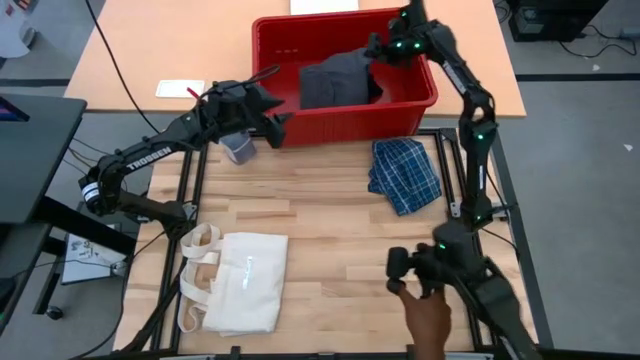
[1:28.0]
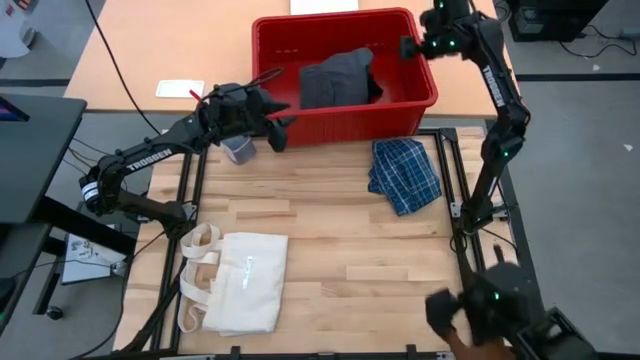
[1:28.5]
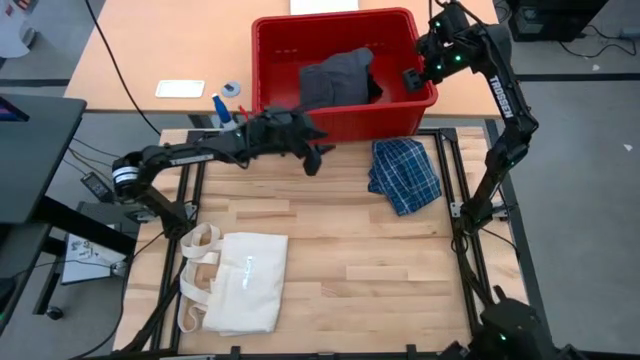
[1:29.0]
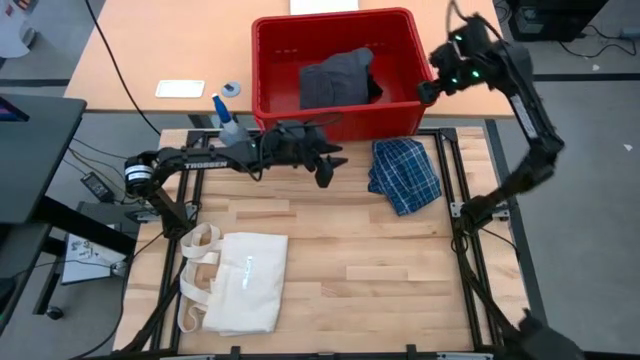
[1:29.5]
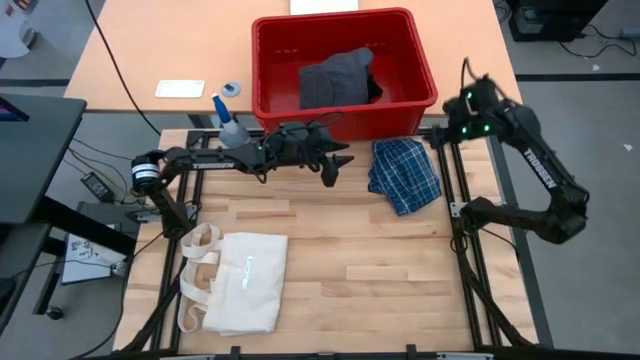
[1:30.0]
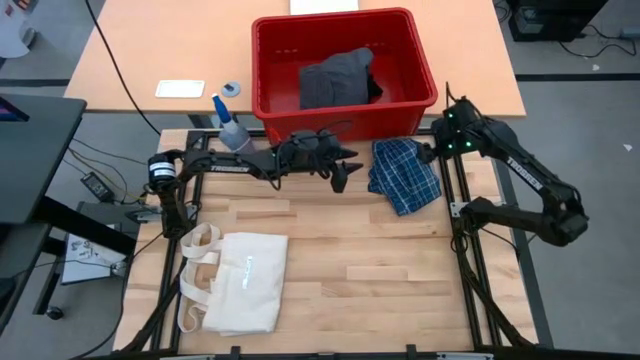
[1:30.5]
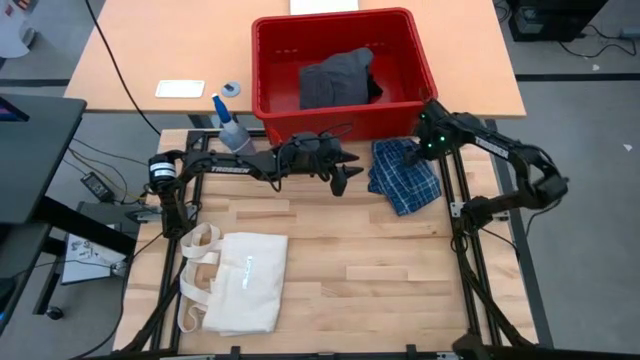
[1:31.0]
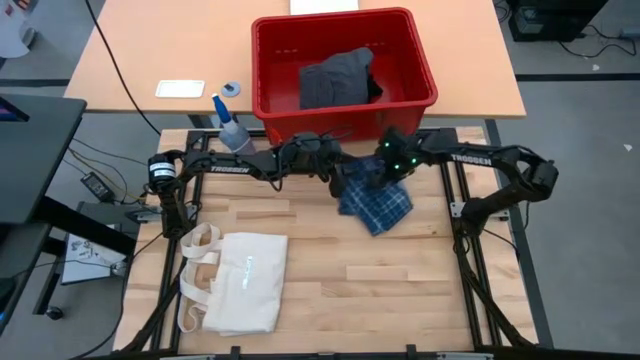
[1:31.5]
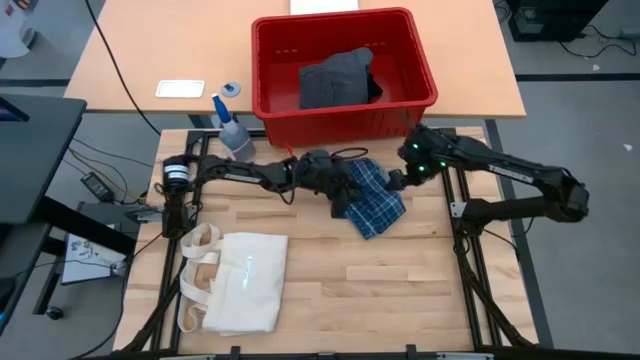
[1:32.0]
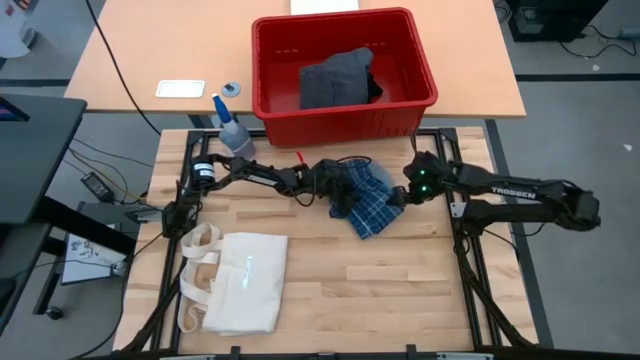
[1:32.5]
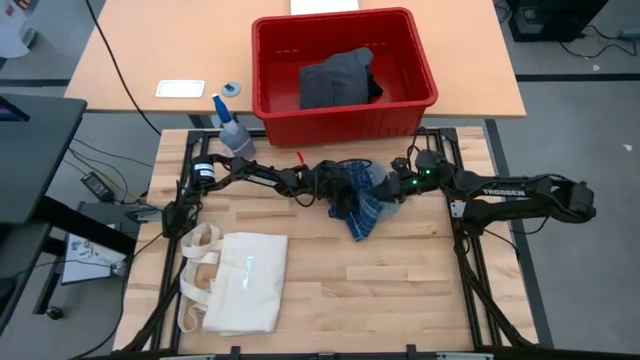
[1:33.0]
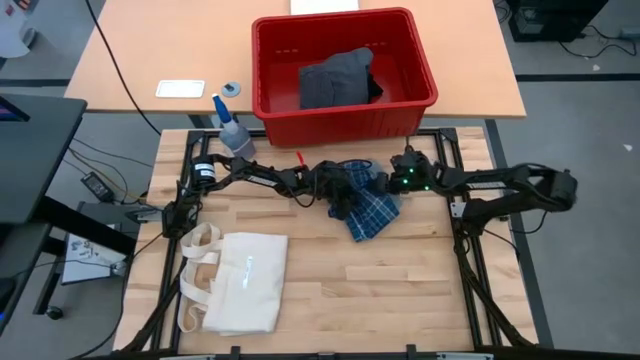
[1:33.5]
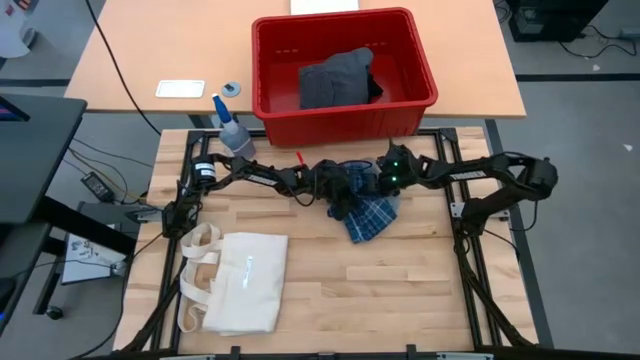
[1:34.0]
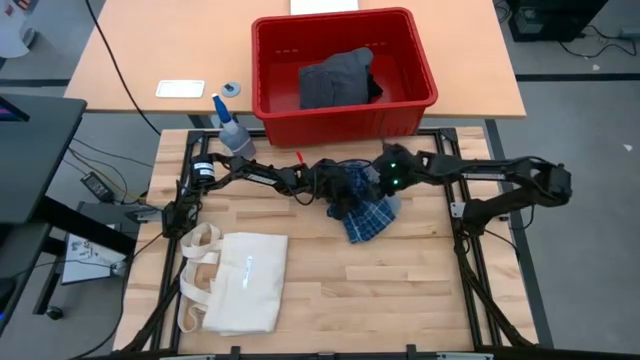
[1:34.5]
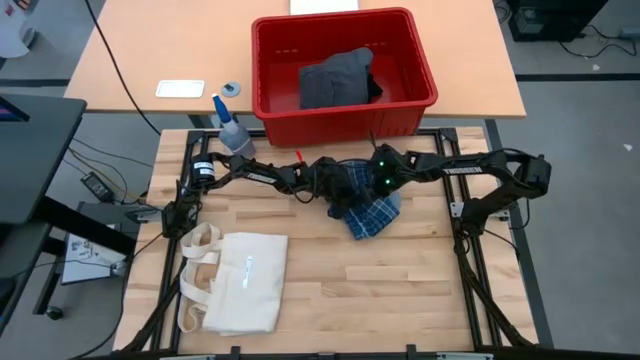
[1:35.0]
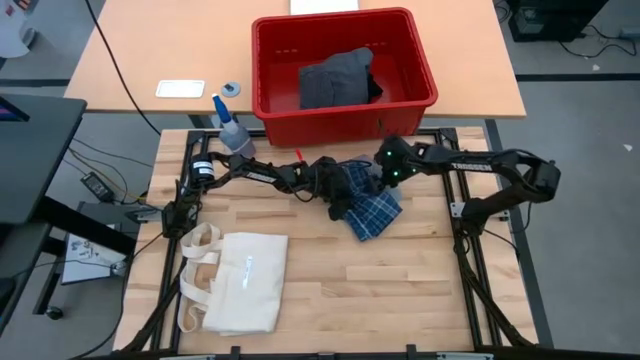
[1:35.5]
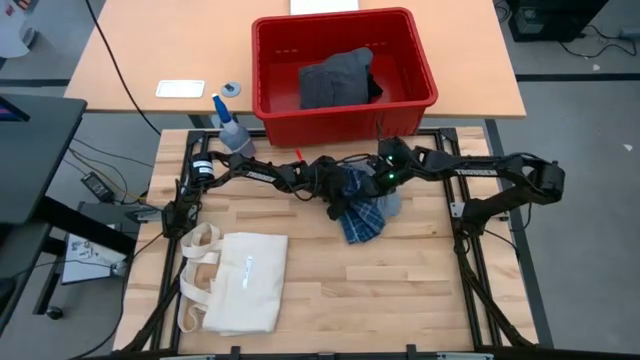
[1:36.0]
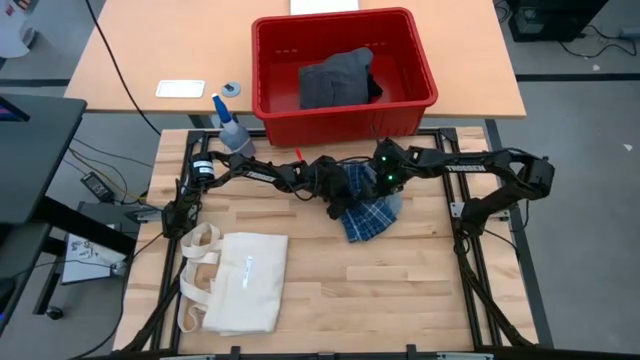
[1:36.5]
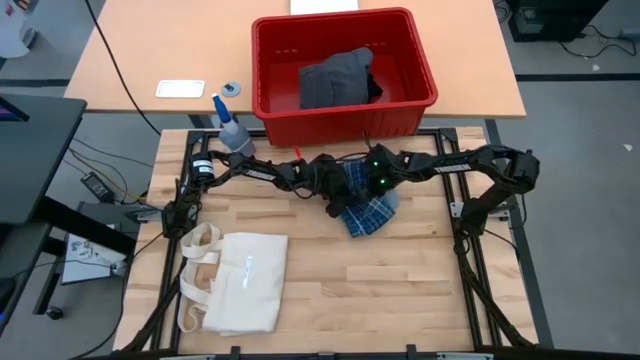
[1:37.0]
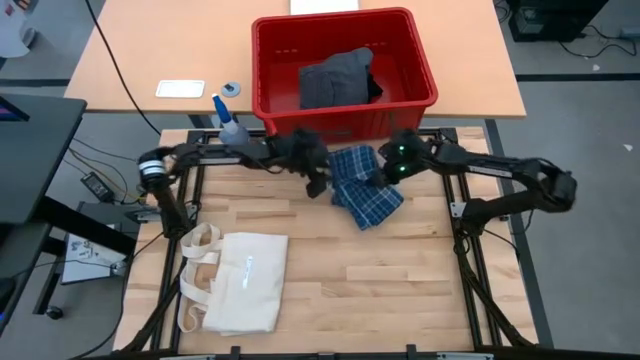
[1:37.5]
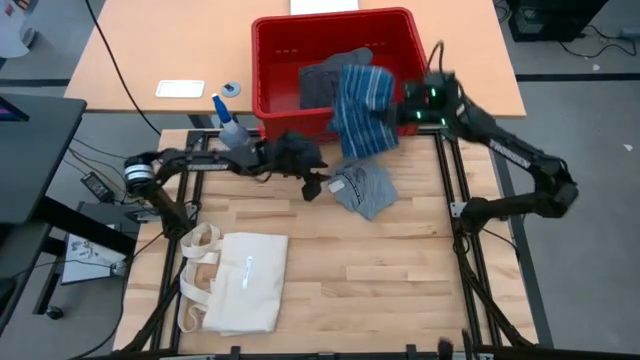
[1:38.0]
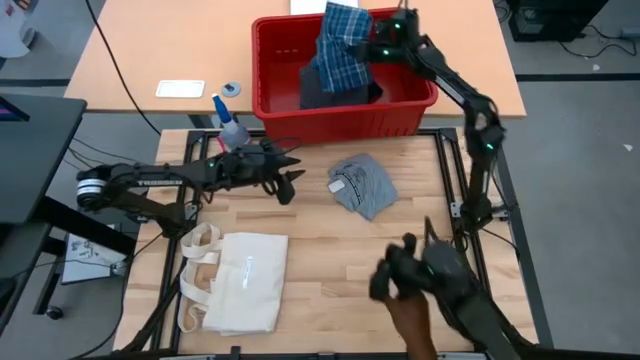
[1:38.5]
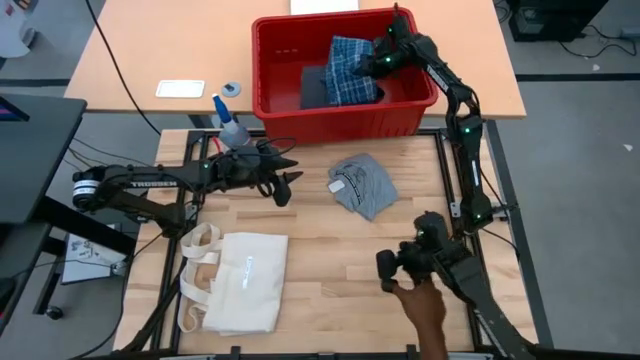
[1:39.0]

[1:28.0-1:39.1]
Task: Fold laundry
Put the folded blue checkered polo shirt into the red bin

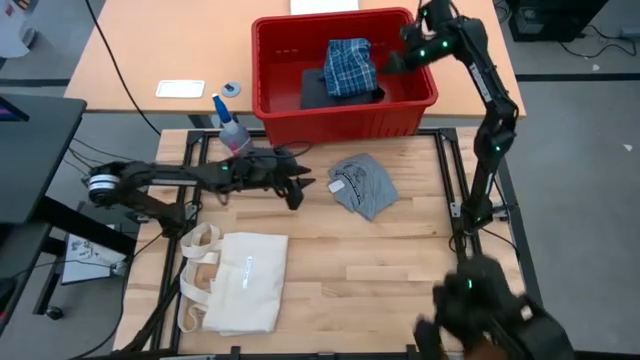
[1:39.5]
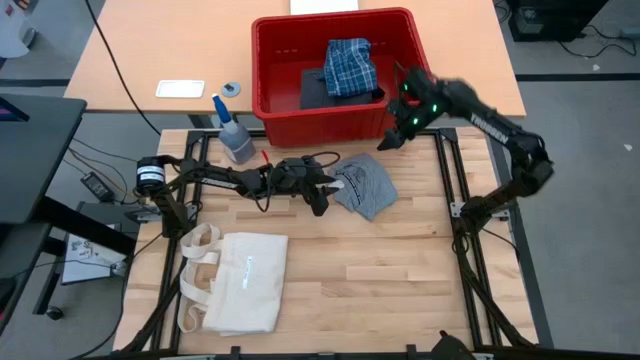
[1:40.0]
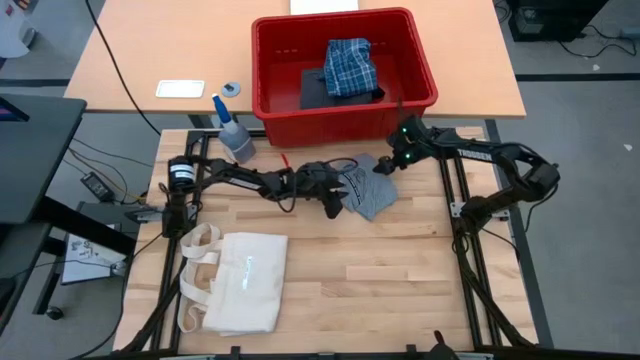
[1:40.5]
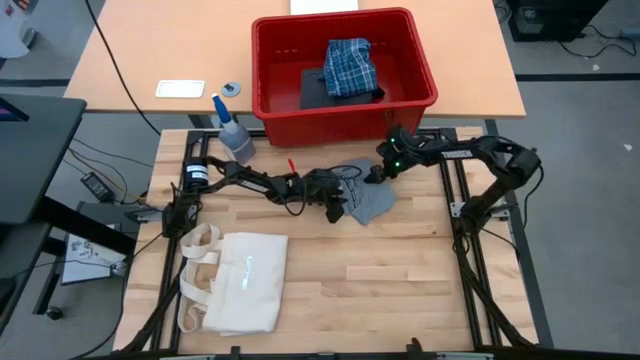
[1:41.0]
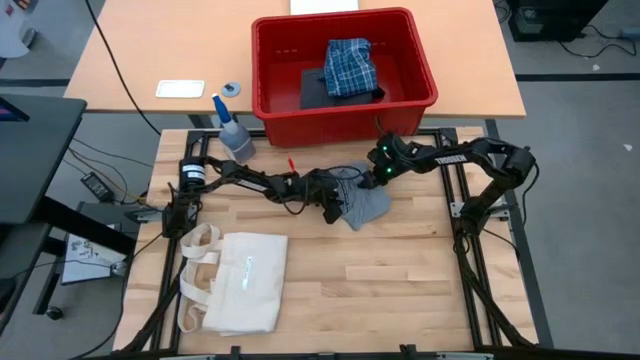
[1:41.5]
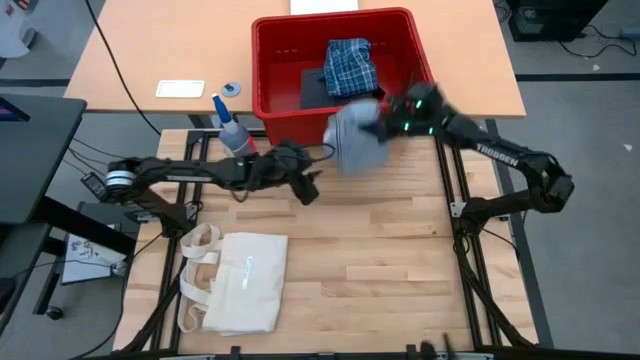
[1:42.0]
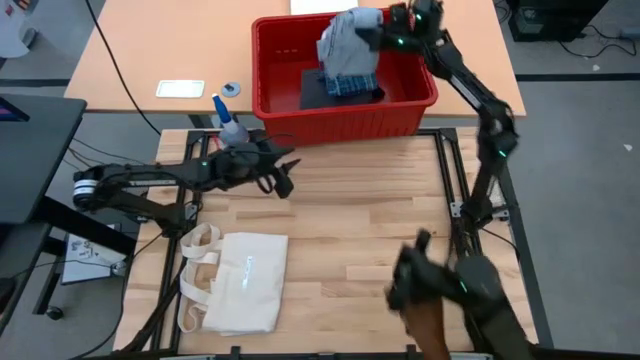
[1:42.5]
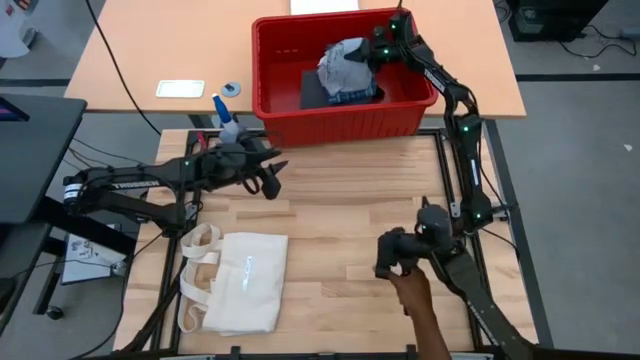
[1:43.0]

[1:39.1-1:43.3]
Put the folded gray shirt into the red bin

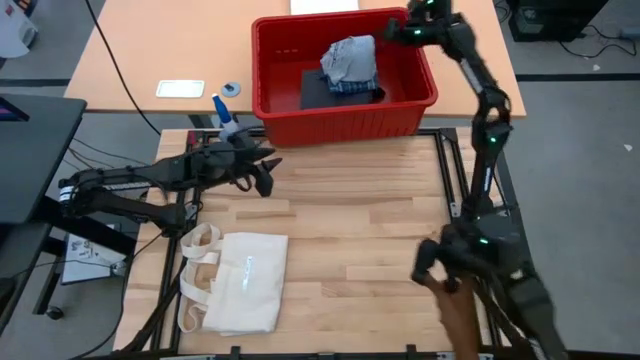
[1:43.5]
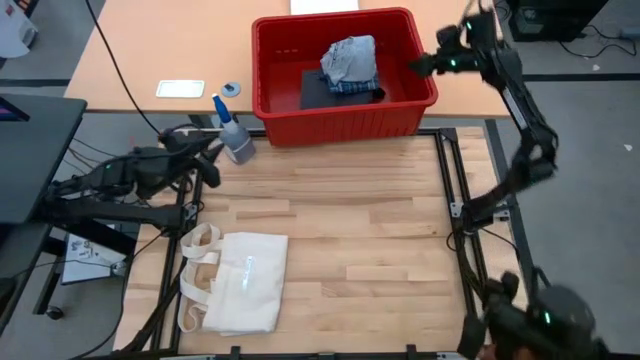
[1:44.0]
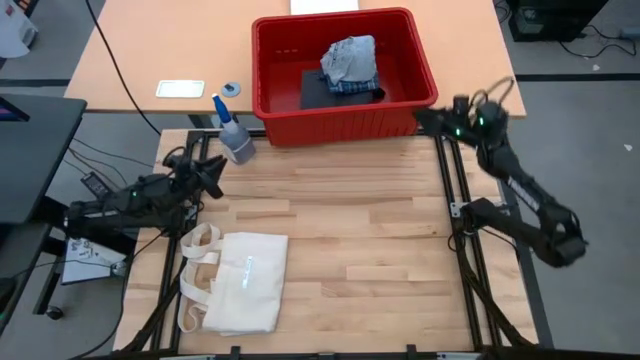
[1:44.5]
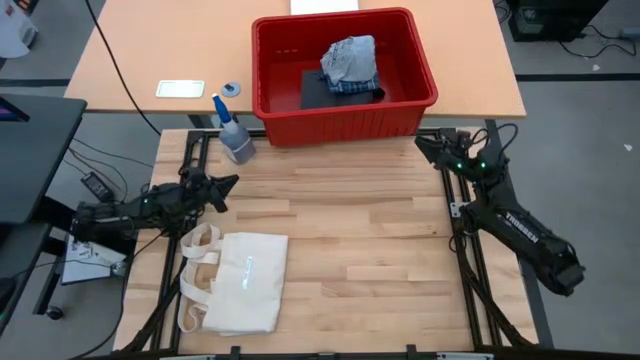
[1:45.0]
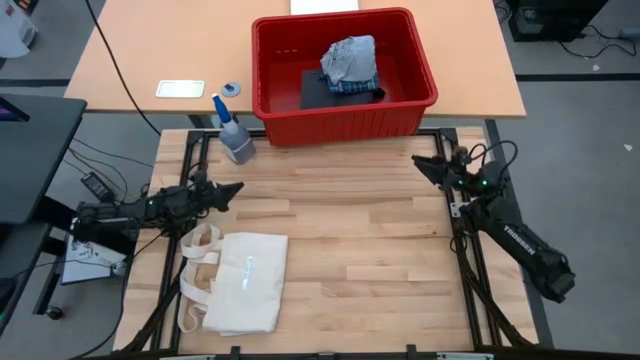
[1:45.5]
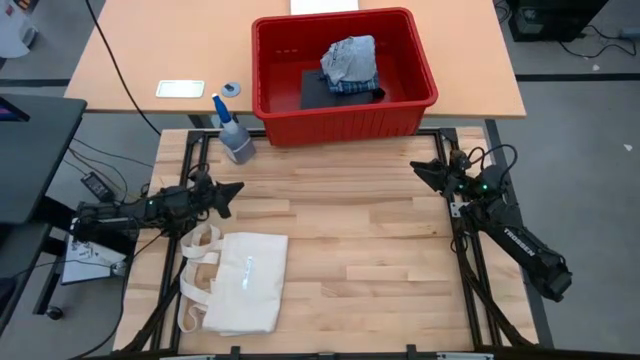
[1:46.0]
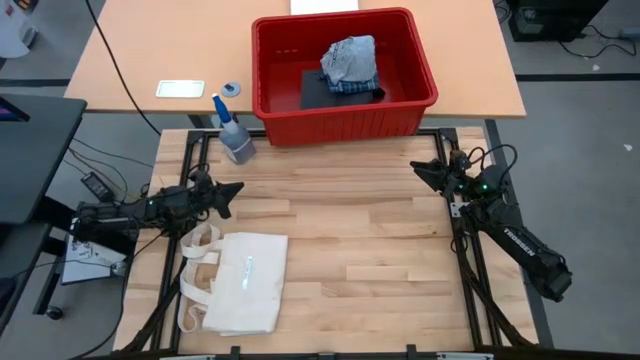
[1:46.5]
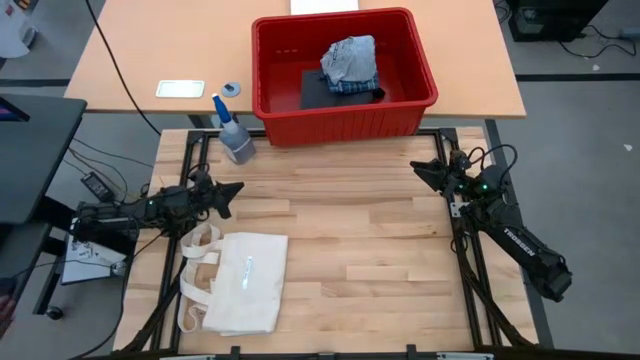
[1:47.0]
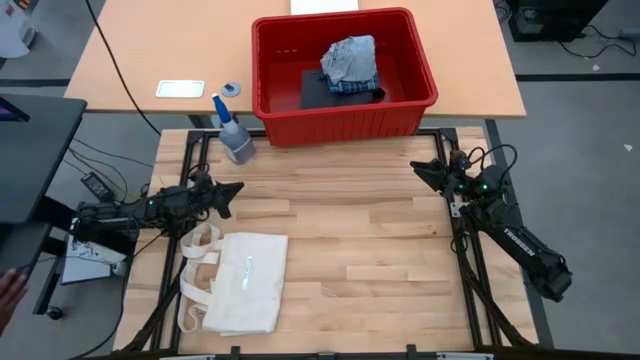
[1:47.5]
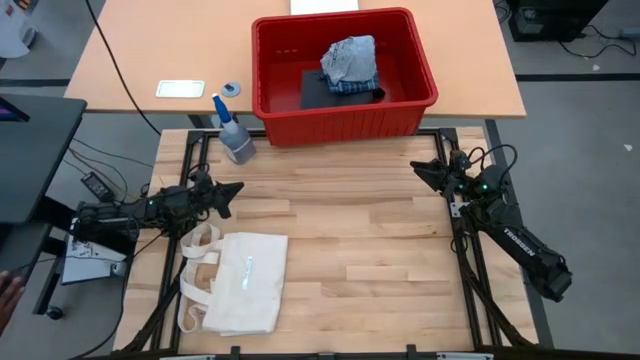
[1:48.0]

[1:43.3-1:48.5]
Return to Home Position

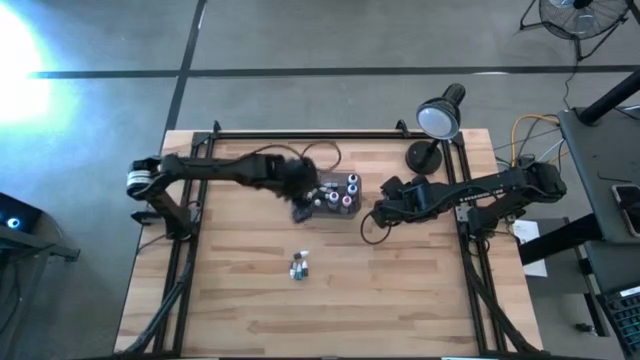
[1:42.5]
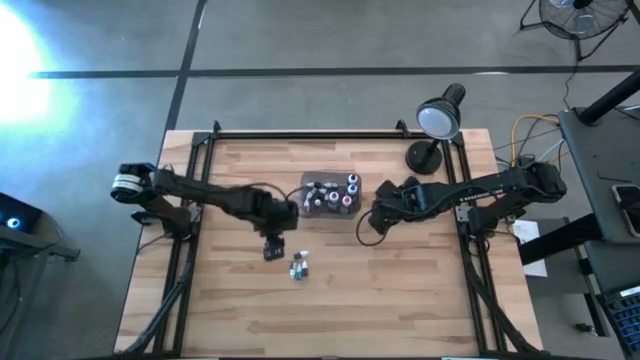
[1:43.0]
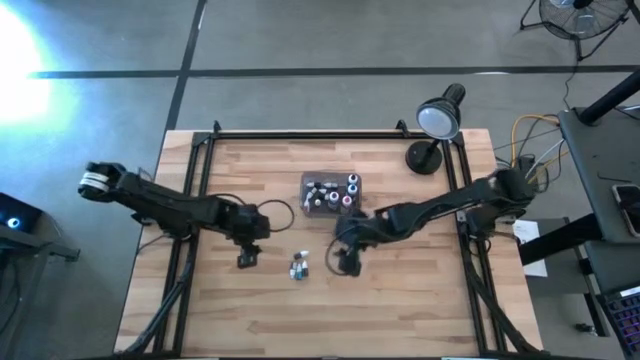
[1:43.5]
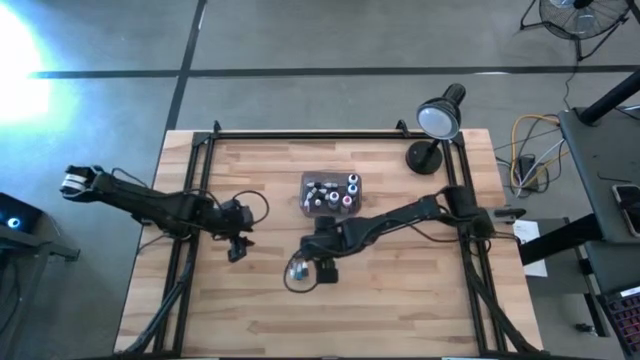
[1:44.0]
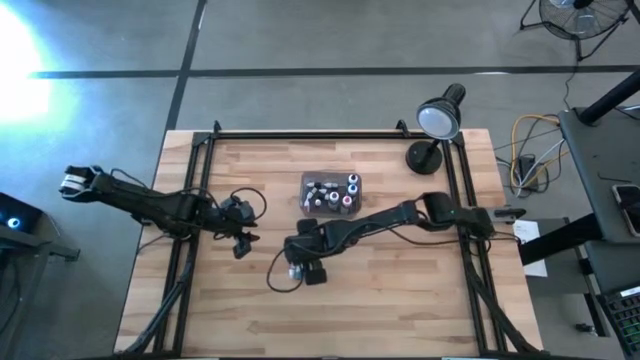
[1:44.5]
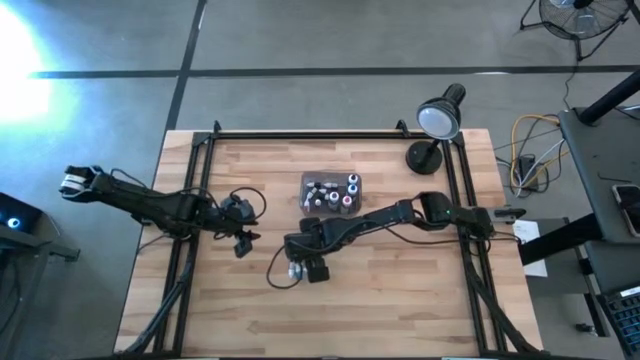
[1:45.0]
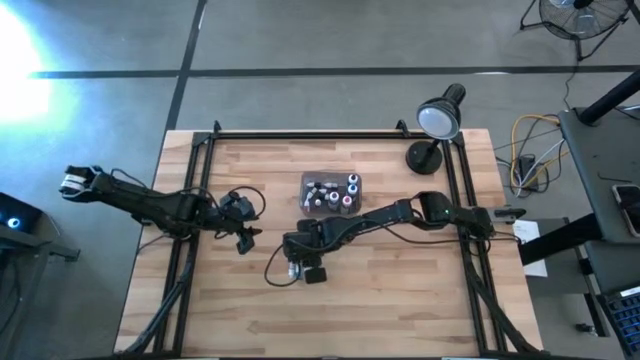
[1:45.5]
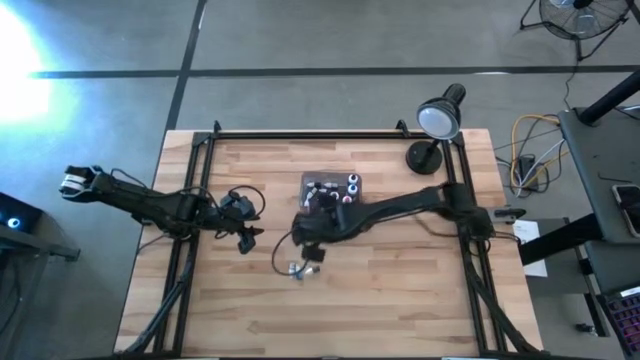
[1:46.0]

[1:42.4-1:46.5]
Task: Pick & Place food coloring
Put the small violet food coloring bottle into the bin
